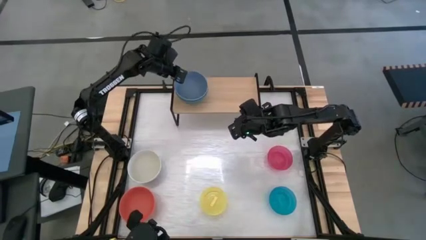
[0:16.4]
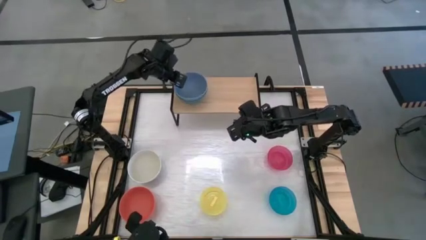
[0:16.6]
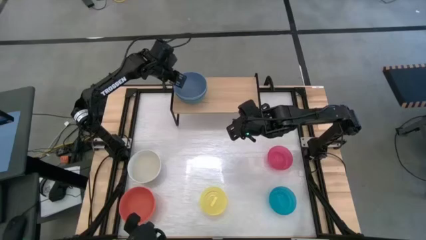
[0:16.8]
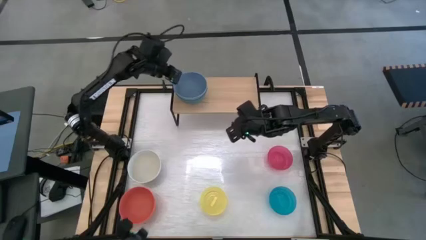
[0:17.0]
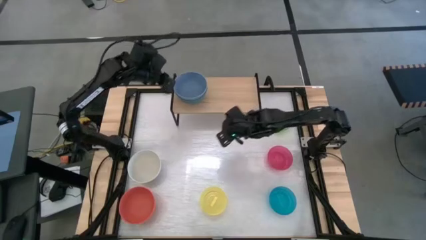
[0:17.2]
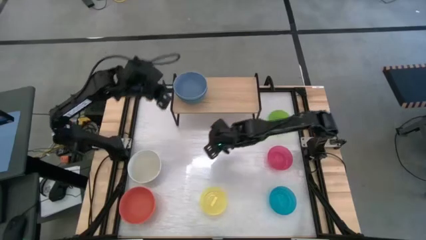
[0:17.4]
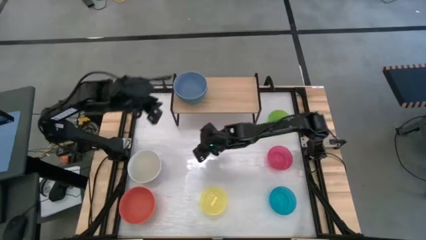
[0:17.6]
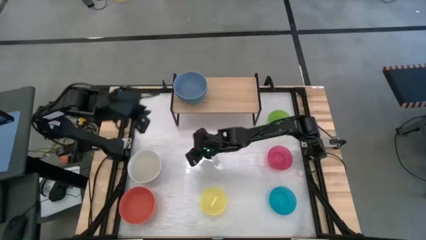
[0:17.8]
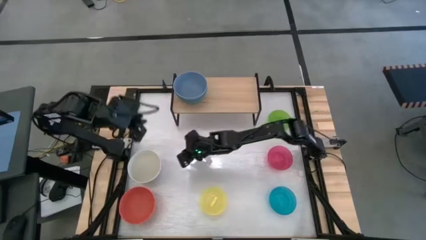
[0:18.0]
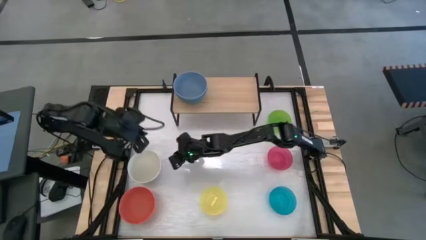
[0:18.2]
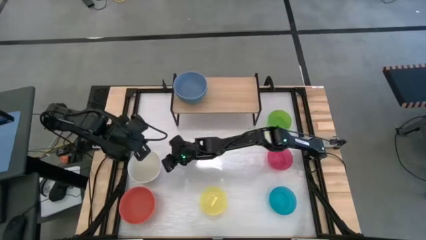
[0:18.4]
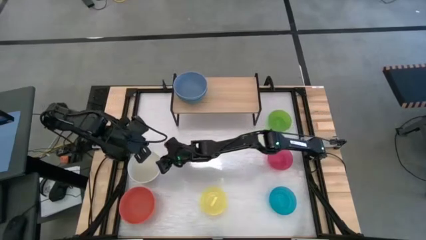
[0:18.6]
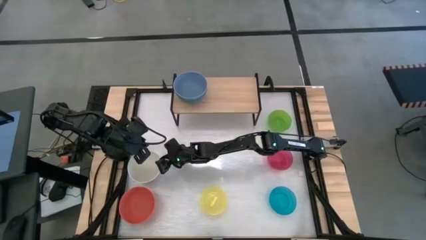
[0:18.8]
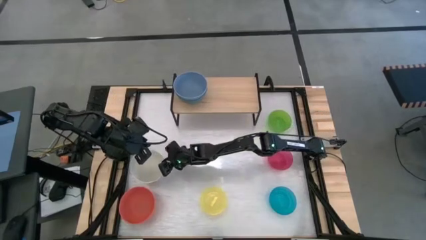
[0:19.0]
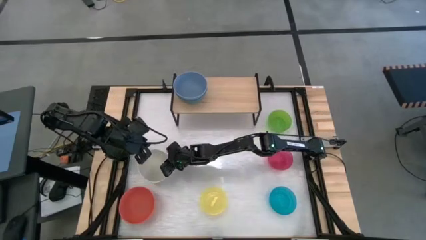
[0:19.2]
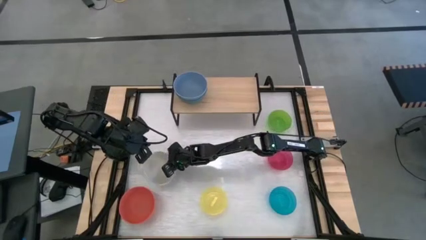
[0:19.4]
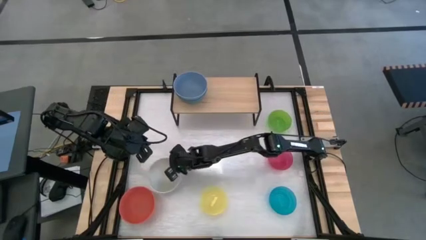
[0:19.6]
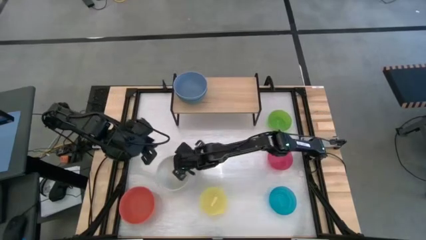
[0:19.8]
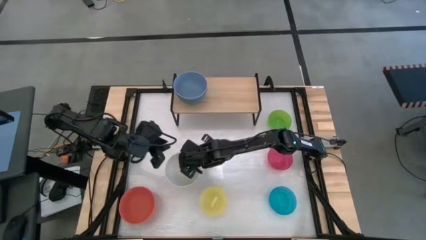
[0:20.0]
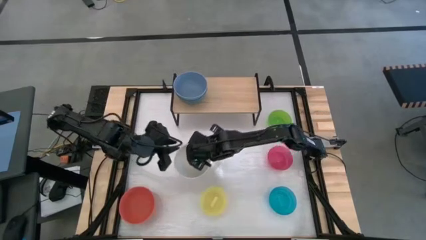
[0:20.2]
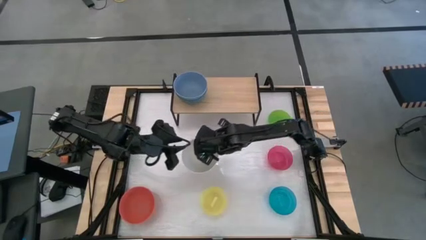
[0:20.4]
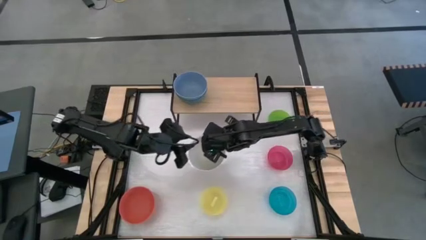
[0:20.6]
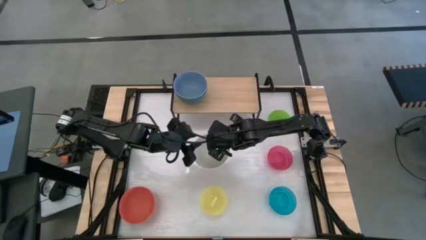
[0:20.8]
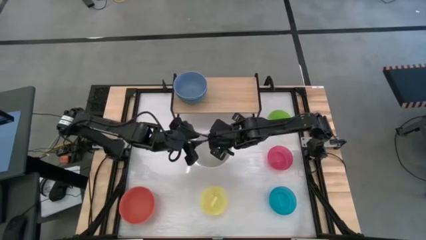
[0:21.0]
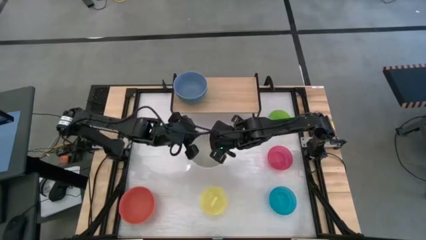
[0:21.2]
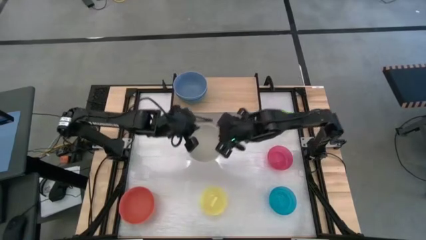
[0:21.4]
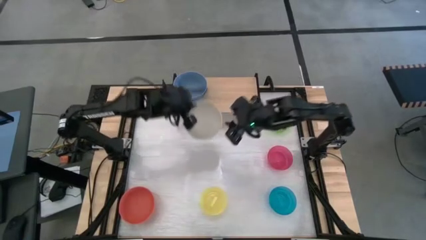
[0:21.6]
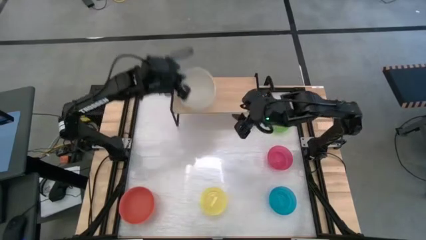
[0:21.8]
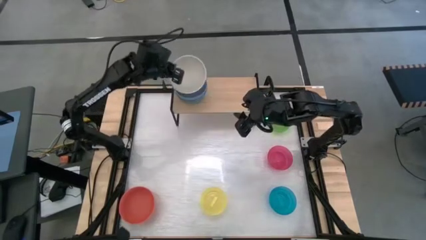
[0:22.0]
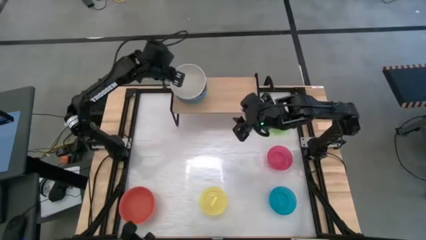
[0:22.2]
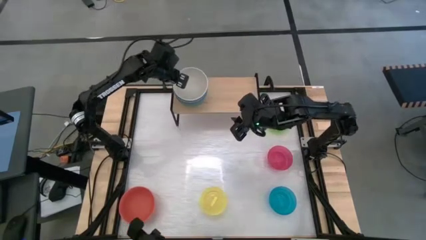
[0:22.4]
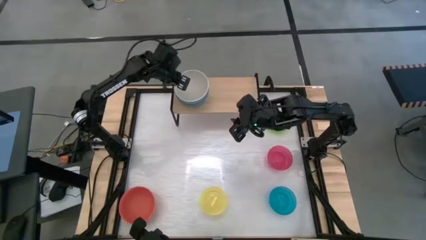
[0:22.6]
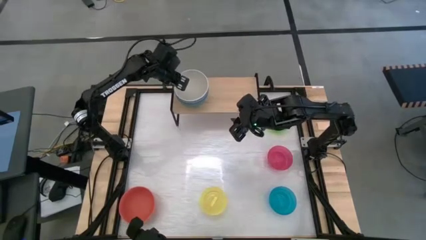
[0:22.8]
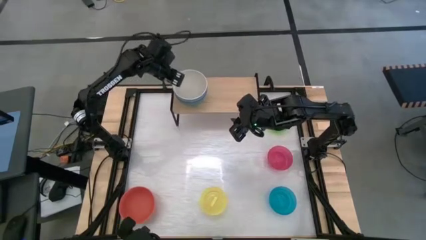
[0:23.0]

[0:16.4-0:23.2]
Task: Place and stack bowls onto a shelf
Stack the gray bowl on top of the blue bowl on the shelf

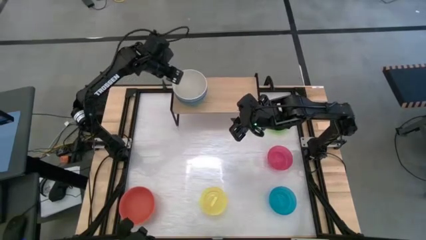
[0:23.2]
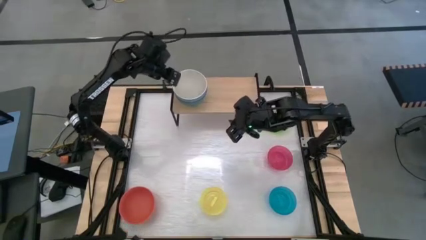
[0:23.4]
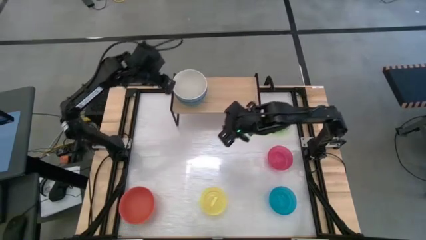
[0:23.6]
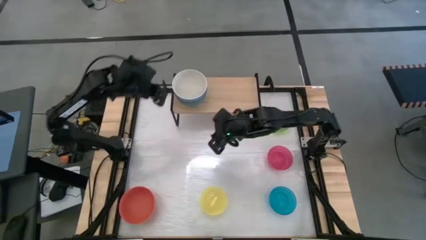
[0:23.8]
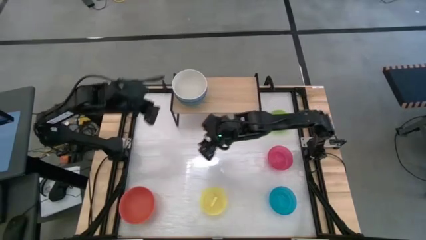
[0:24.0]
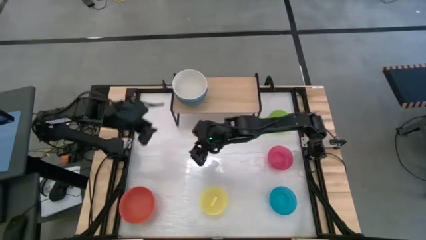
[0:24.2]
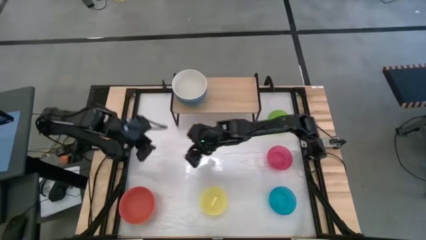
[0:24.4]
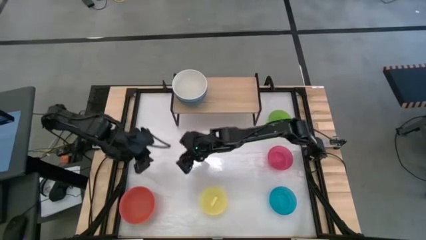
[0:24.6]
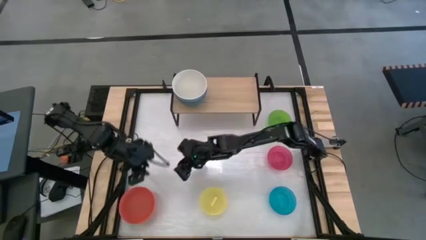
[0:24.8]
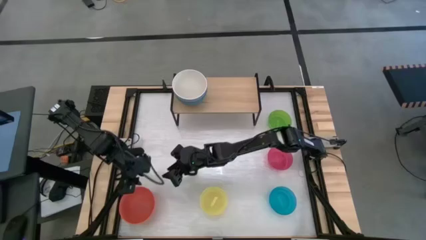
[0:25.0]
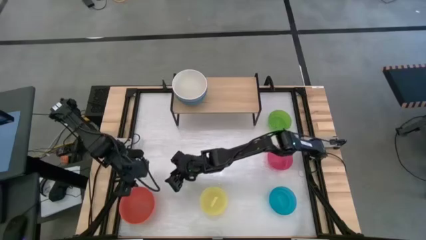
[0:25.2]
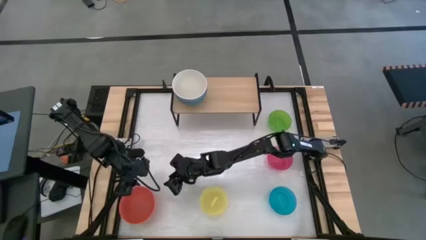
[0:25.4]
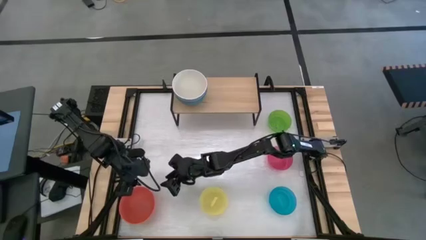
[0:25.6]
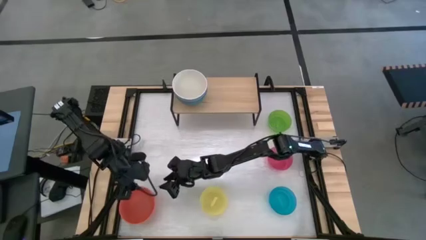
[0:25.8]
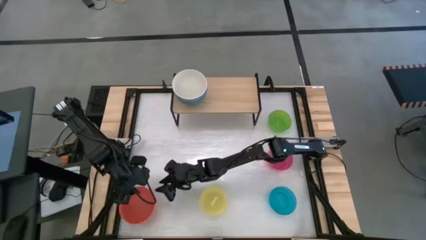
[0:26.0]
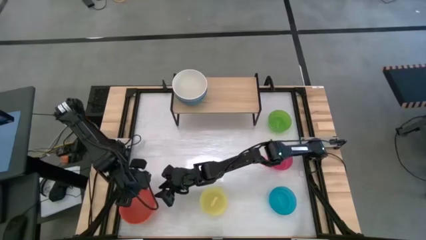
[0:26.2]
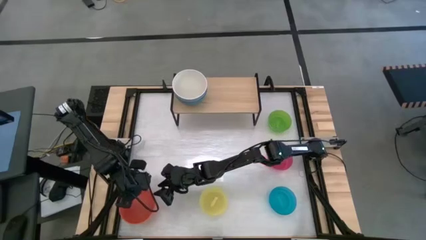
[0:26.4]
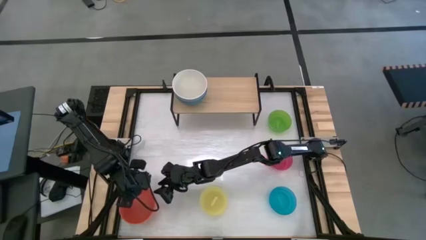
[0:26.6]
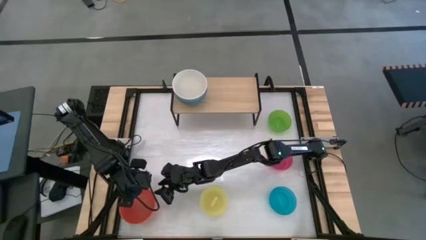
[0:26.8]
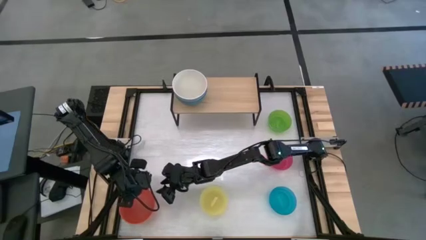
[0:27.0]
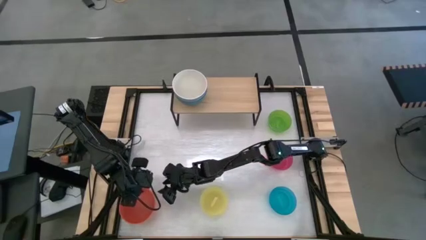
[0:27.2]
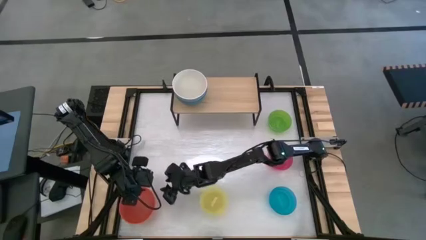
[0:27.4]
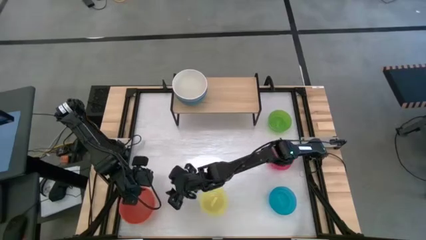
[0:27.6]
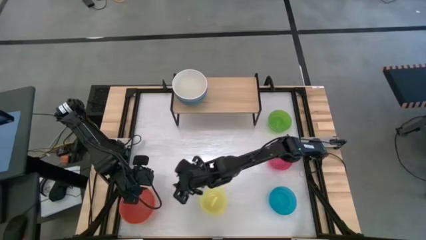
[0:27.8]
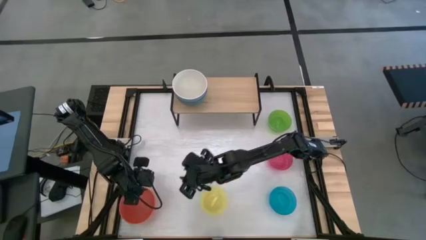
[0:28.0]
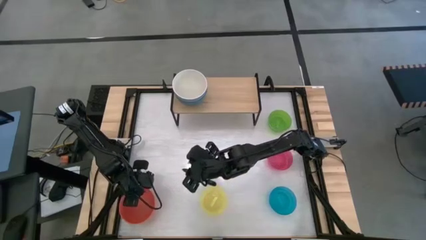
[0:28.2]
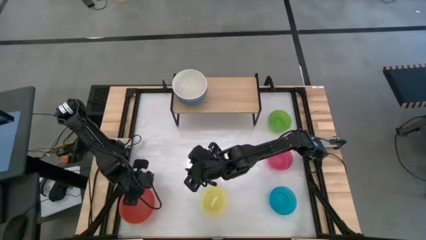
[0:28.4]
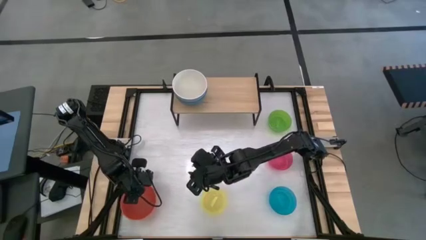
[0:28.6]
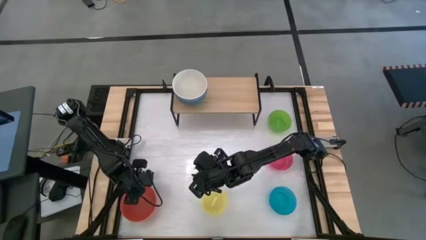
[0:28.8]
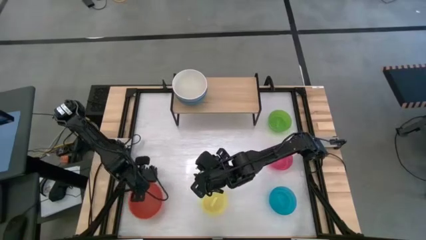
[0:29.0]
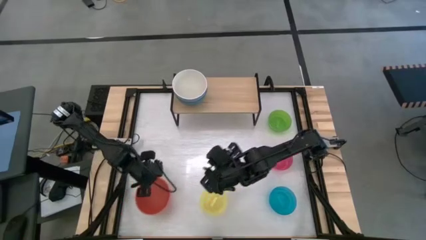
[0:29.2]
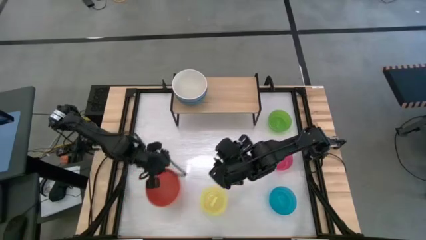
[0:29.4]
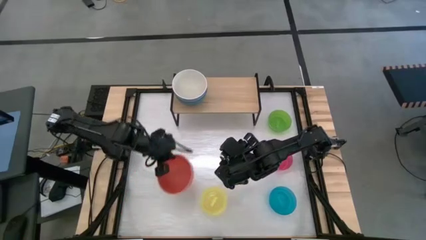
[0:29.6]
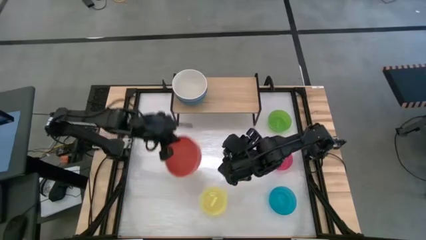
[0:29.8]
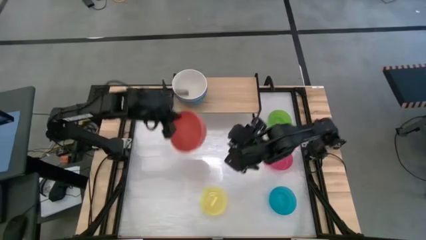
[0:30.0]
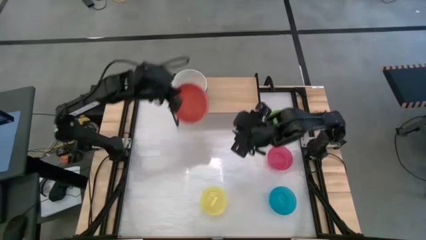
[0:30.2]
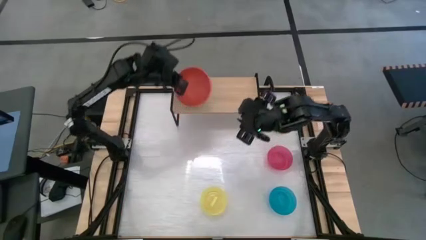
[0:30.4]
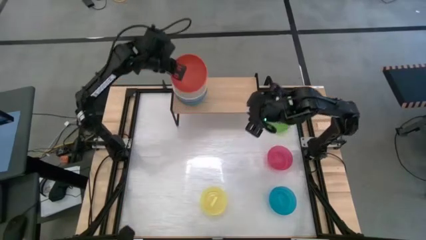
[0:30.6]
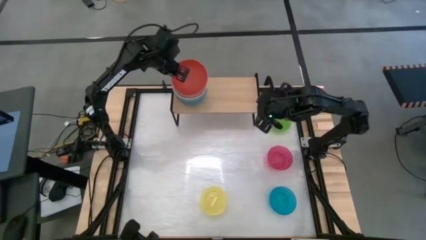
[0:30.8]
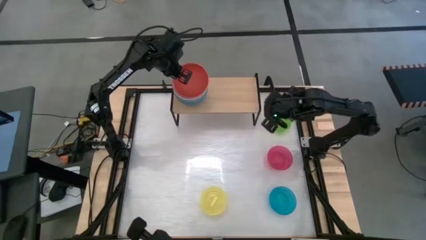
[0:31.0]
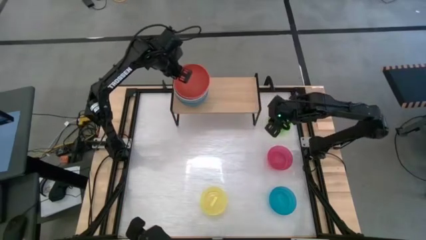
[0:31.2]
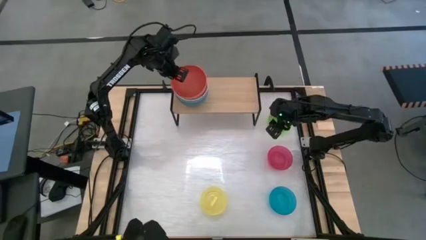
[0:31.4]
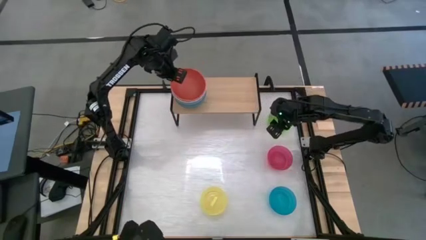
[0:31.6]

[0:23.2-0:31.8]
Stack the pink bowl on top of the gray bowl on the shelf
